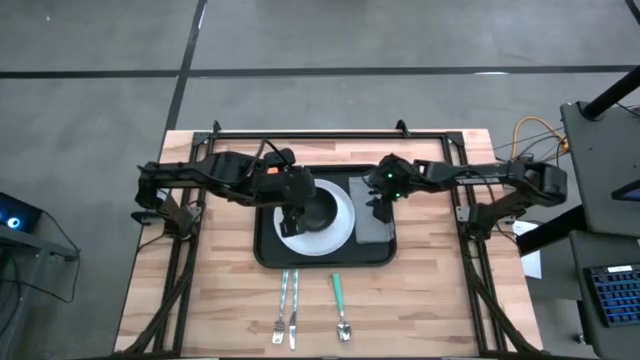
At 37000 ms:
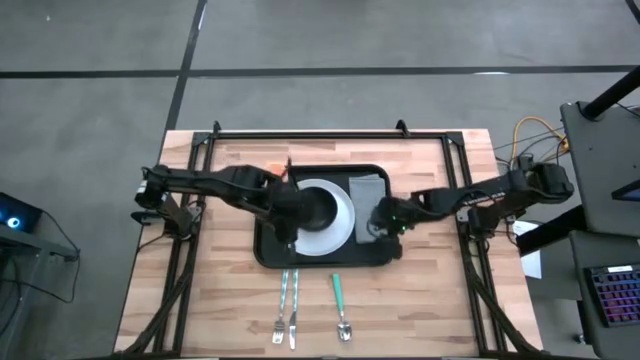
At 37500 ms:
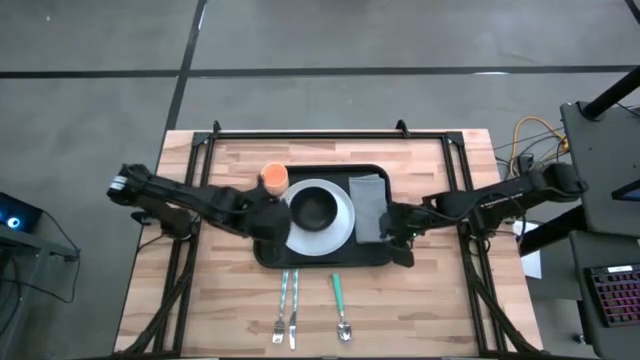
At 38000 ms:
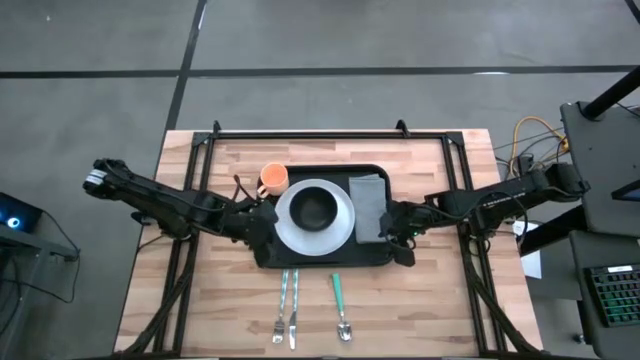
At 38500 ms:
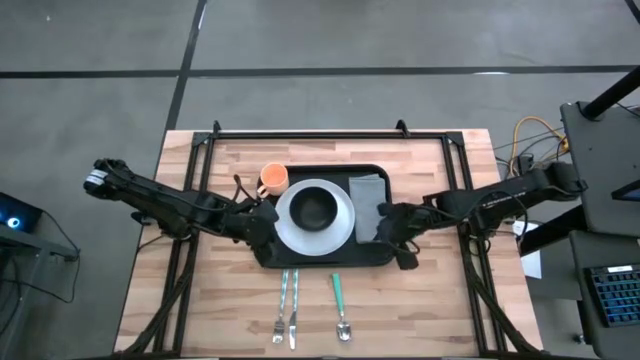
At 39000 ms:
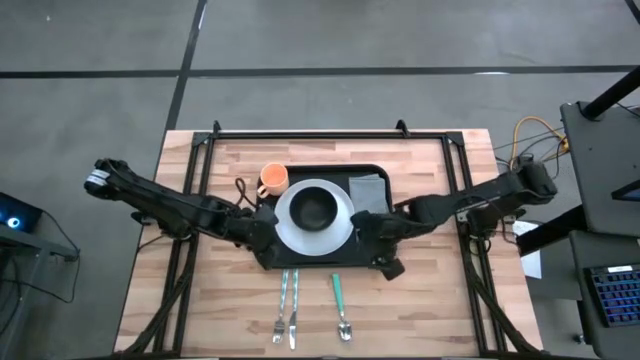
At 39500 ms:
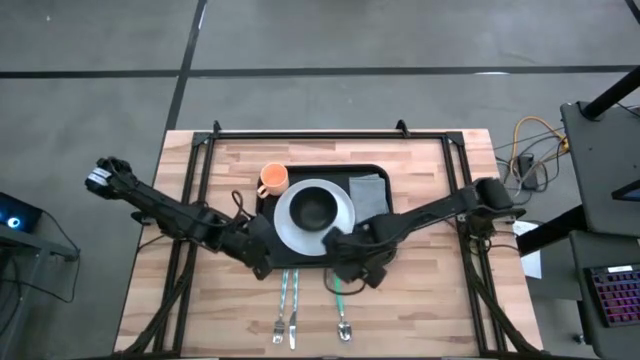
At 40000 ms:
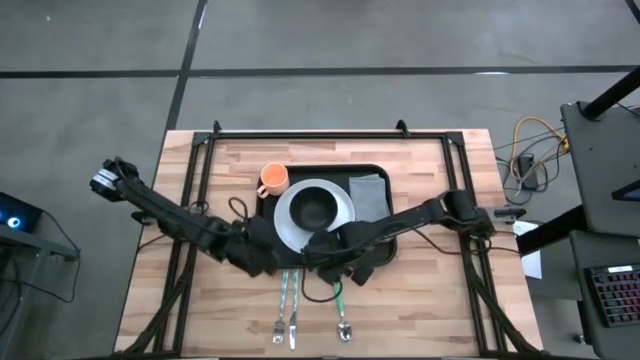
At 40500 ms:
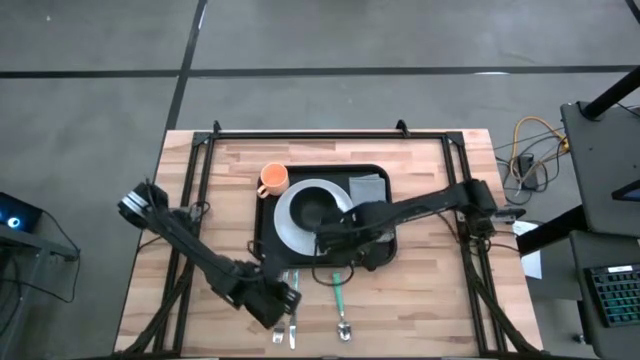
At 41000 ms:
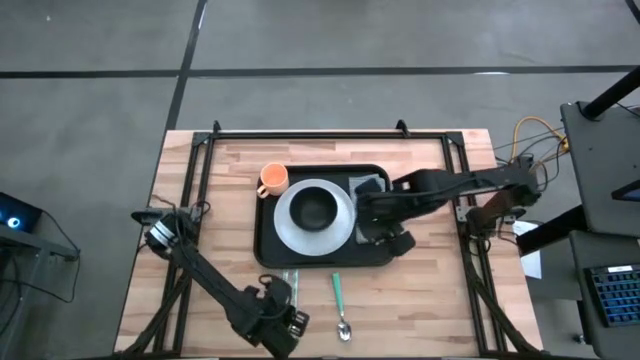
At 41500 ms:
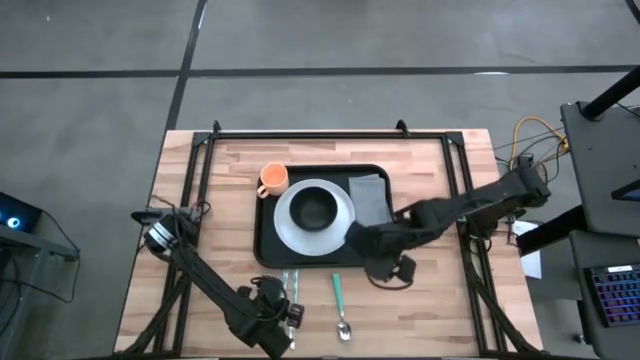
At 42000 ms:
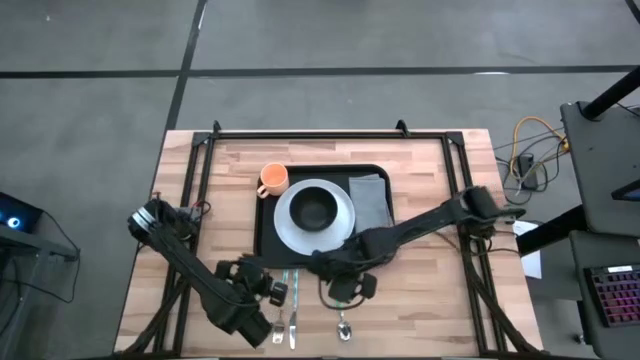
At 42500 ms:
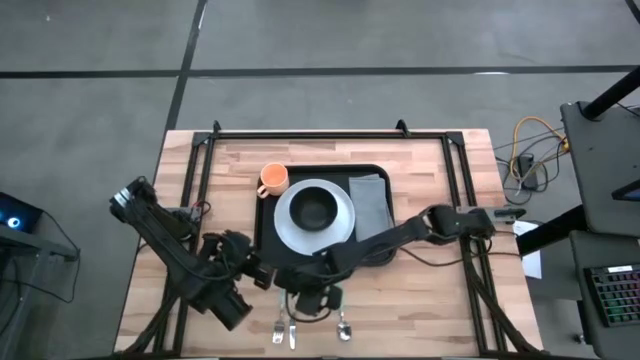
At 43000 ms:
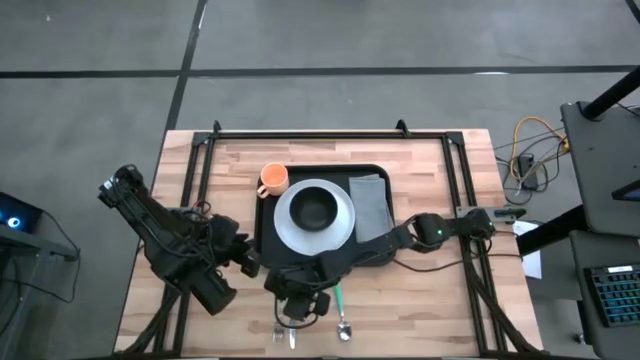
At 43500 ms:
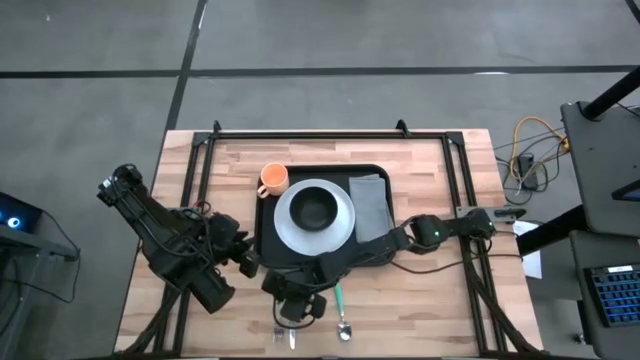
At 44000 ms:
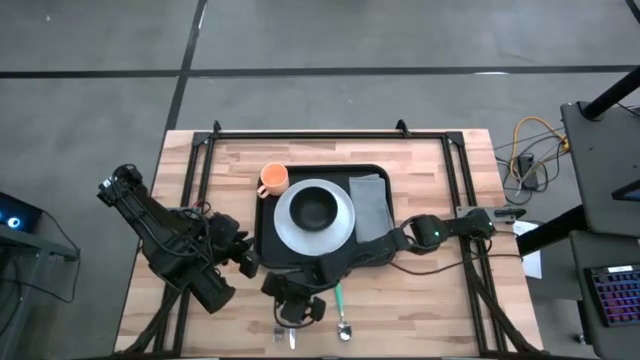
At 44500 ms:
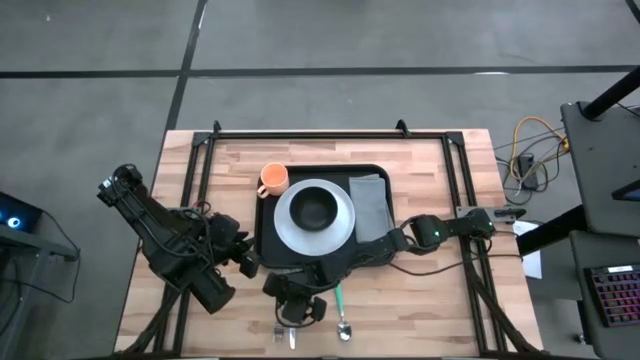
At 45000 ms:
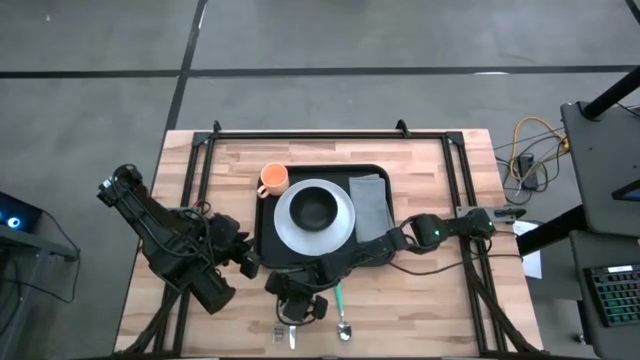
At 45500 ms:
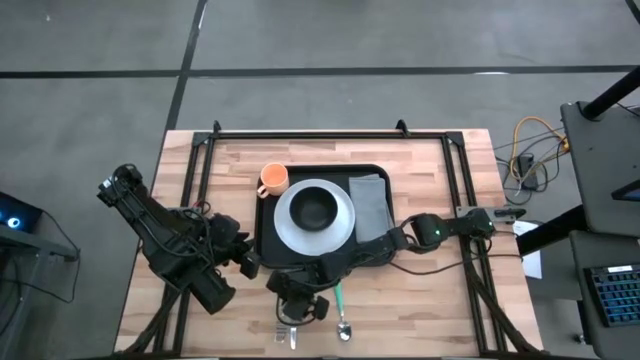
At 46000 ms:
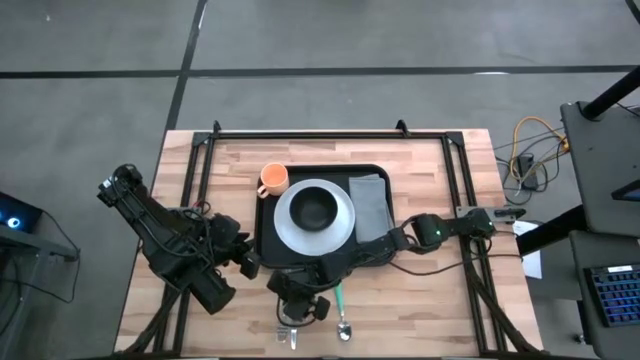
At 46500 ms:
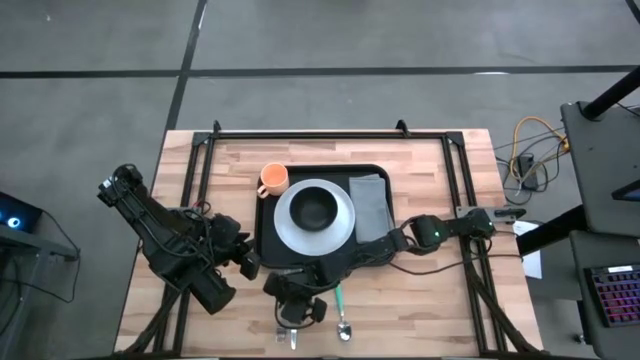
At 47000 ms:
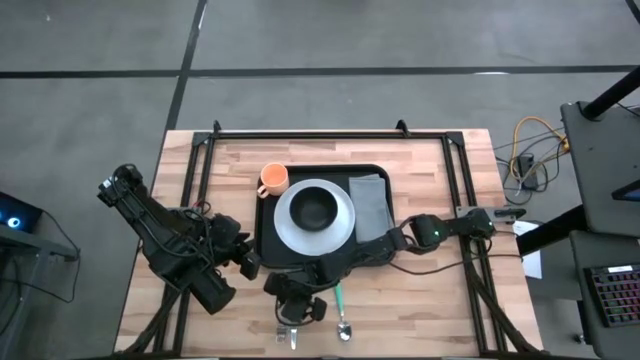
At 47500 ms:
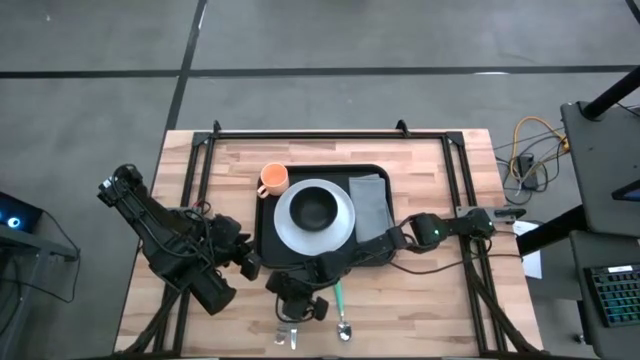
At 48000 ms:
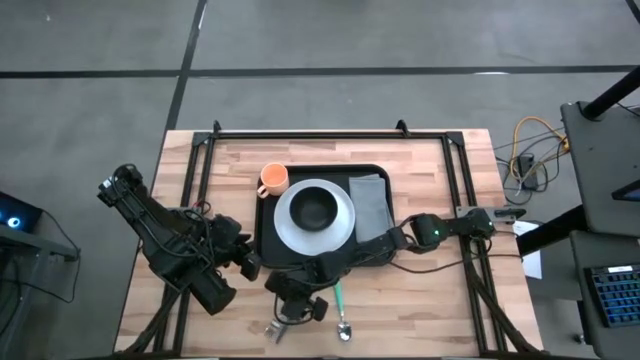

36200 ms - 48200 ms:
Task: Set up tray
Put the blue fork on the gray napkin to the right of the white plate

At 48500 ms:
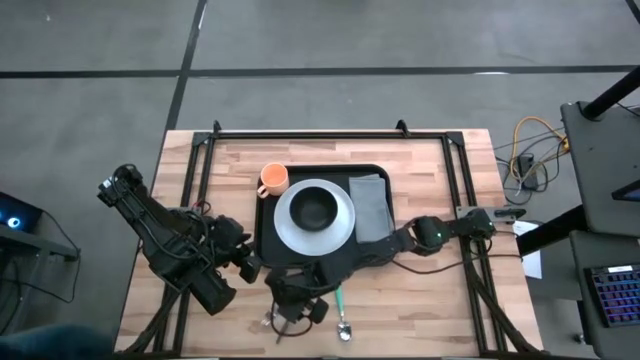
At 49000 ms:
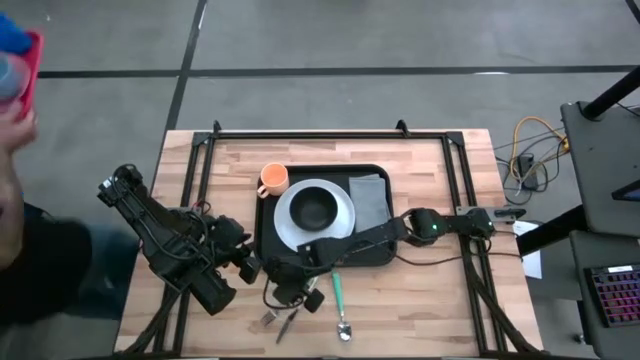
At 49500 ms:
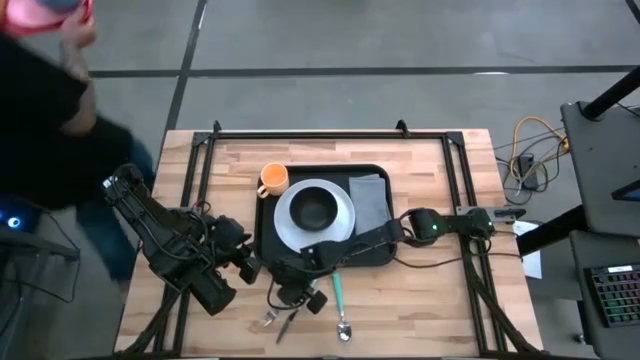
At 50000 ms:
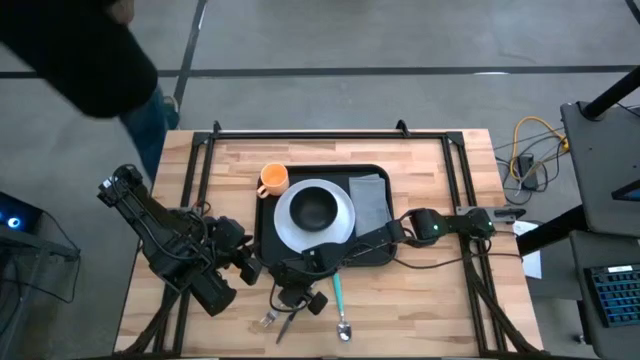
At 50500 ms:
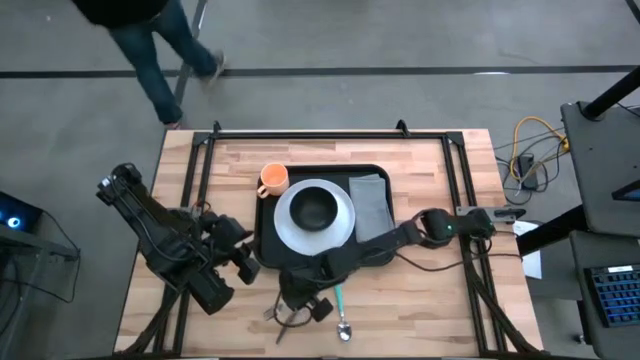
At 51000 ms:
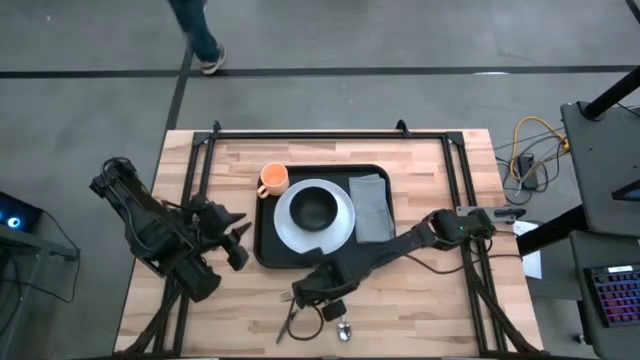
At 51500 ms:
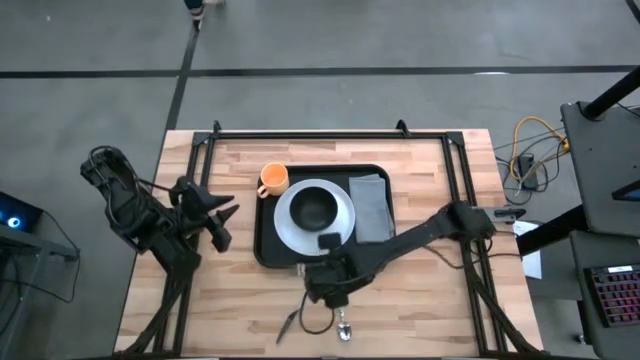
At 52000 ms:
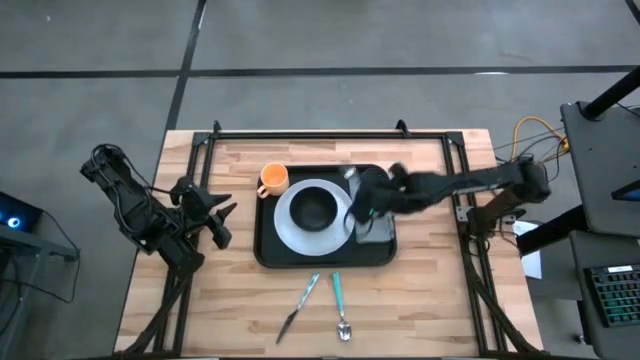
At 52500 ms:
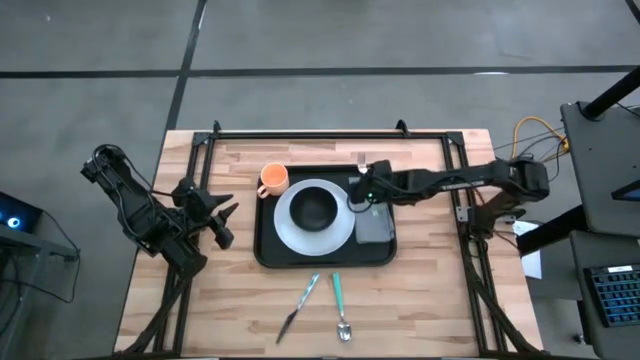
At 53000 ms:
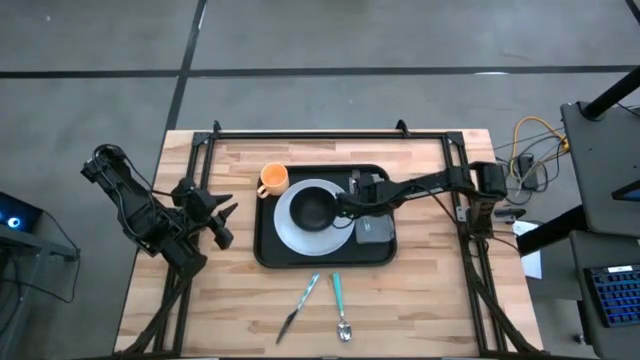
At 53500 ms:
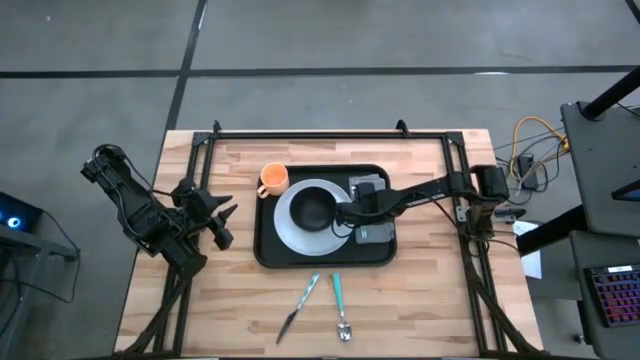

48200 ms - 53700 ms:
Put the blue fork on the gray napkin to the right of the white plate

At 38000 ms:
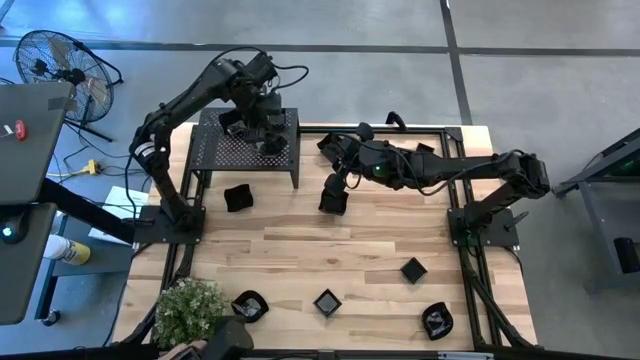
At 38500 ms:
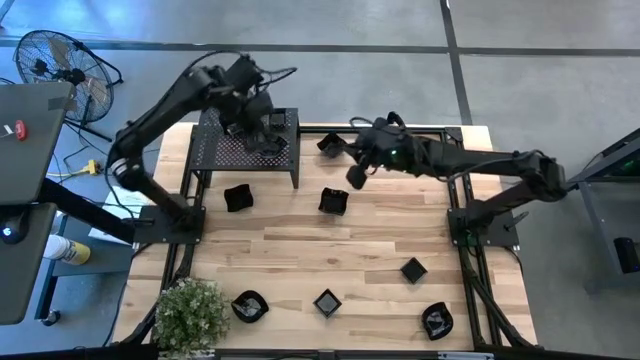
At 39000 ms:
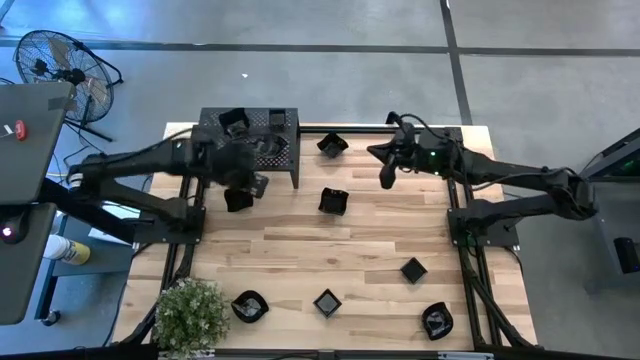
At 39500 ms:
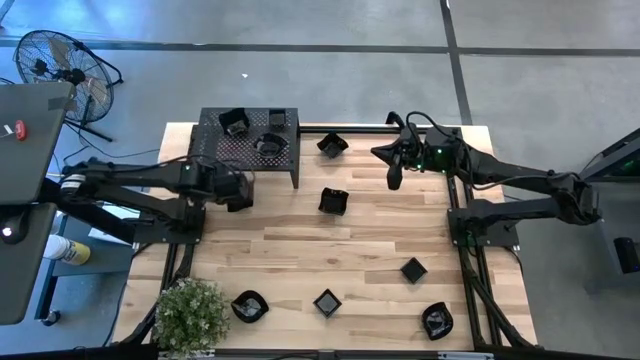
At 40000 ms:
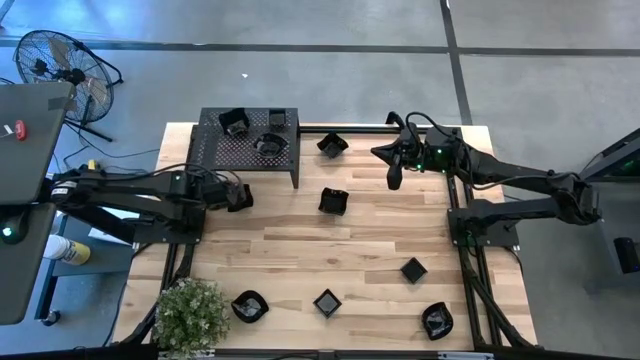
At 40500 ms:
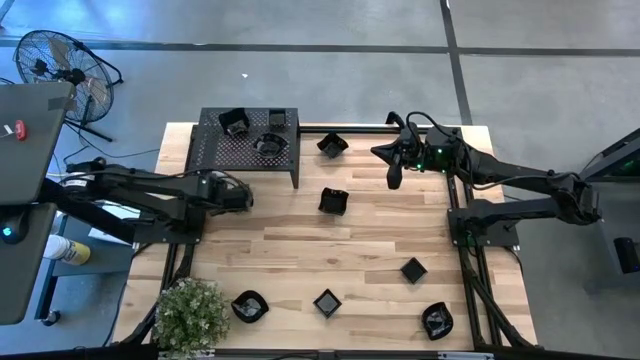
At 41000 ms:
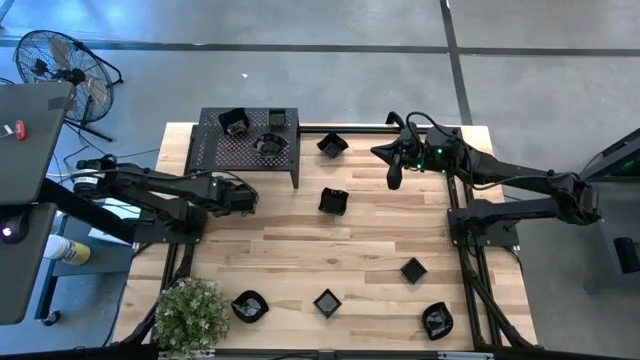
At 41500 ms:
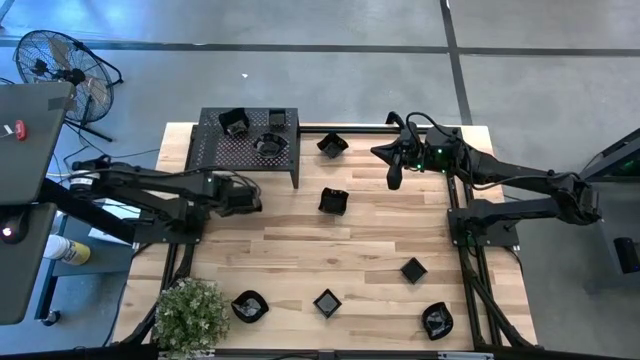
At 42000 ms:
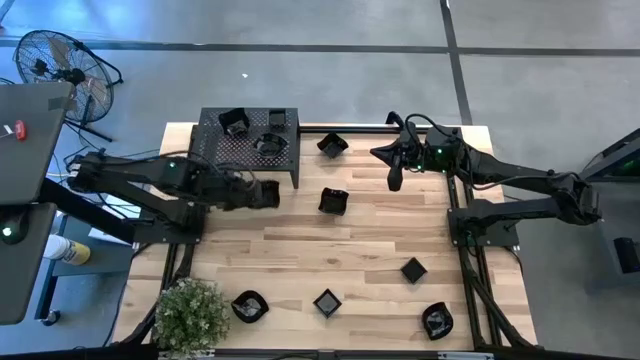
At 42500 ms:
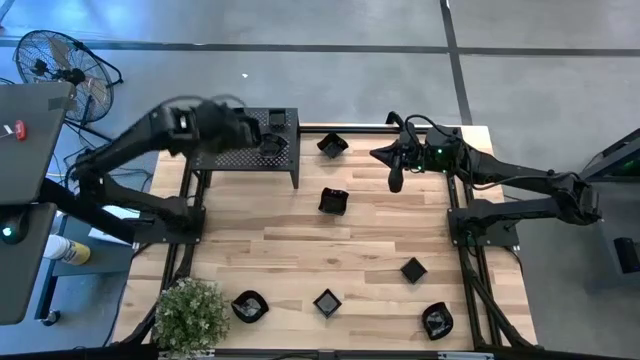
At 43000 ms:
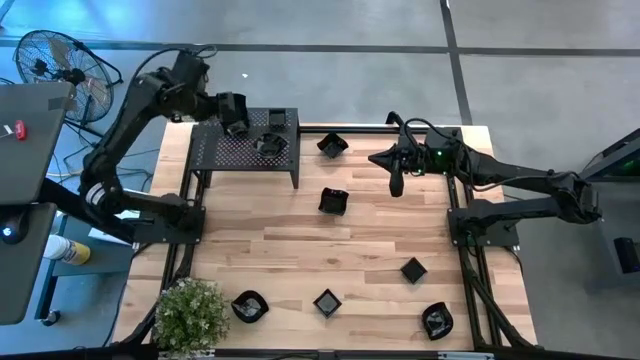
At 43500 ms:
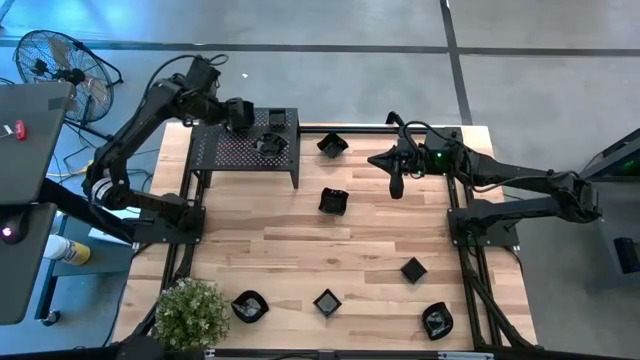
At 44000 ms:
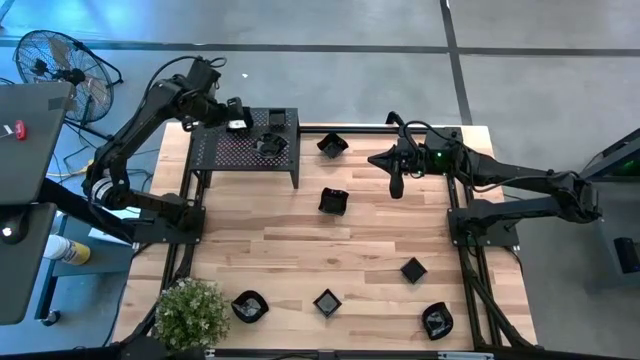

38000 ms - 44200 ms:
Task: Pick & Place Mini shaped plates
Stack the distorted square plate on top of the other distorted square plate on the shelf
